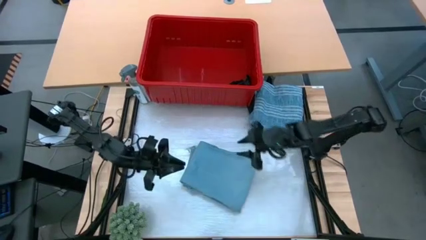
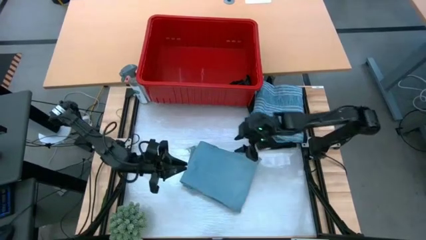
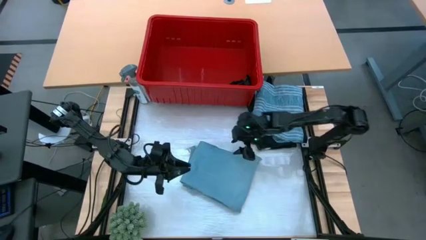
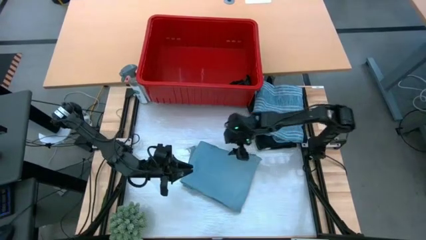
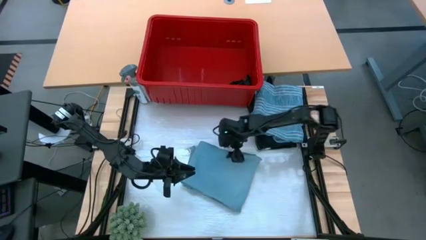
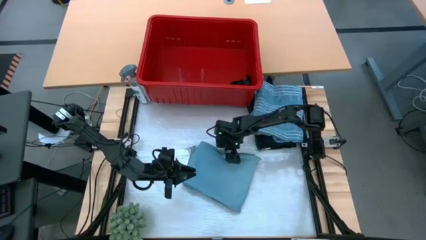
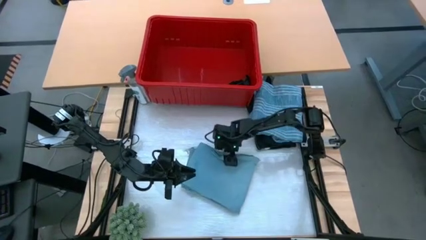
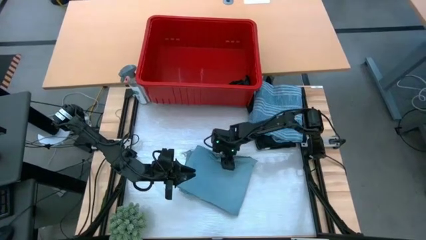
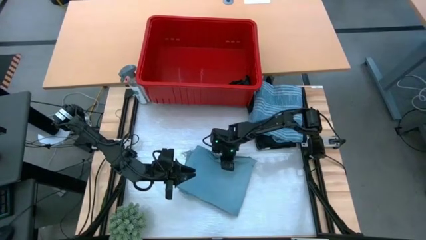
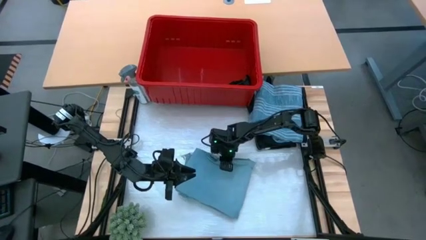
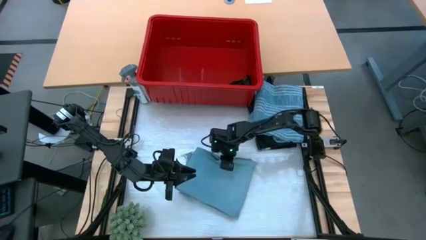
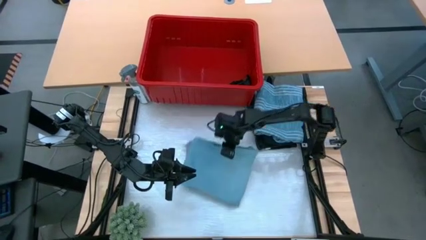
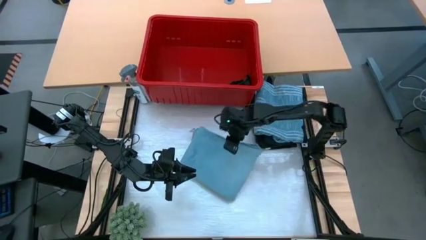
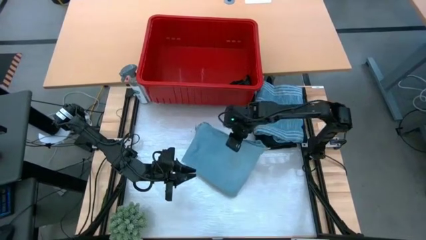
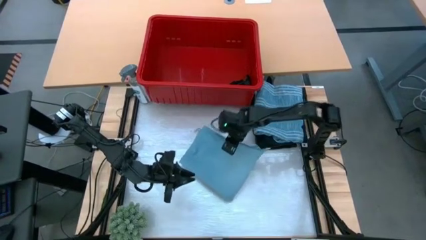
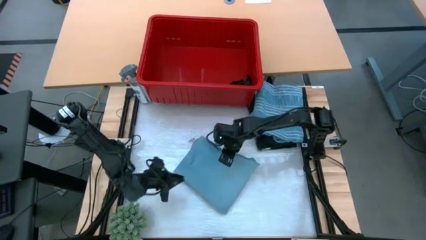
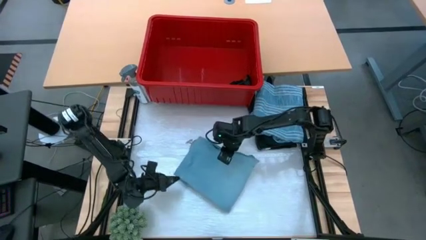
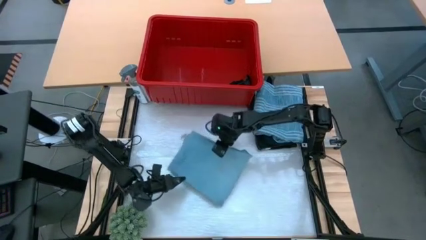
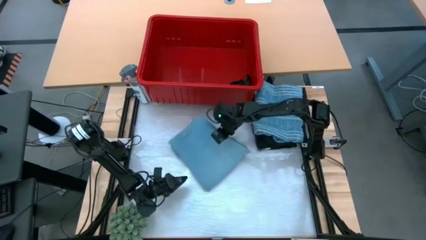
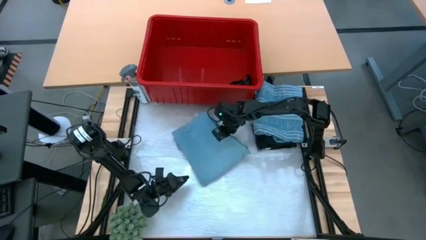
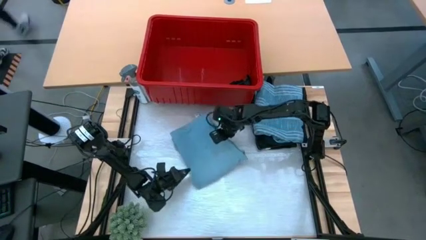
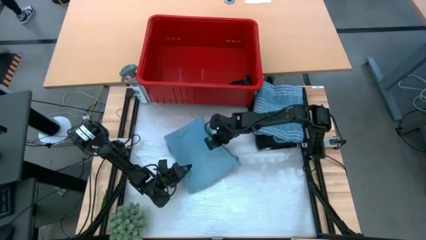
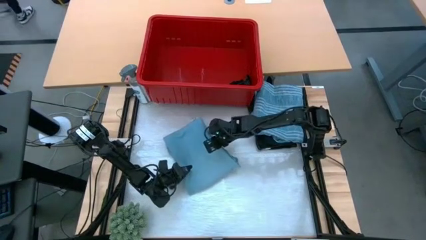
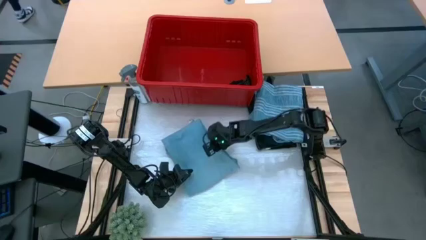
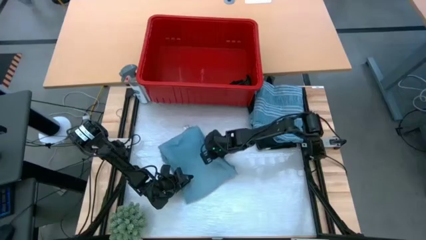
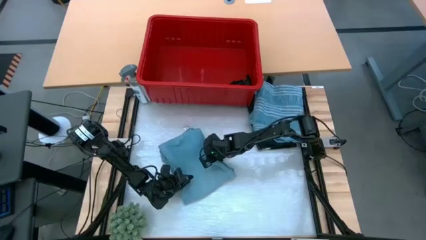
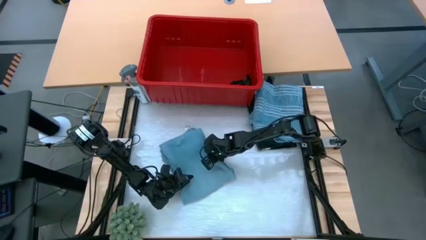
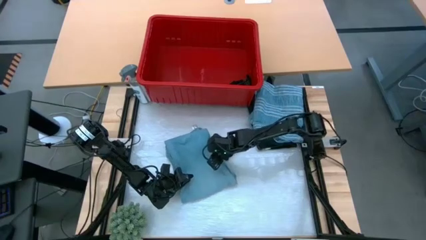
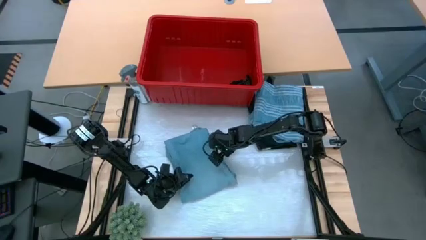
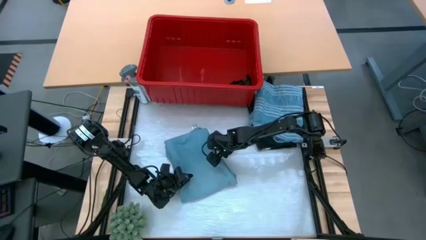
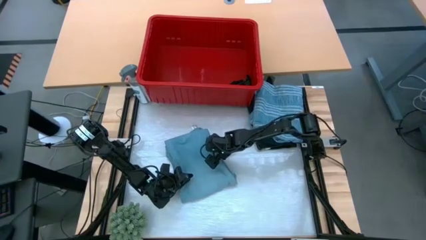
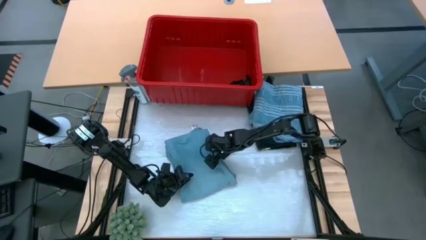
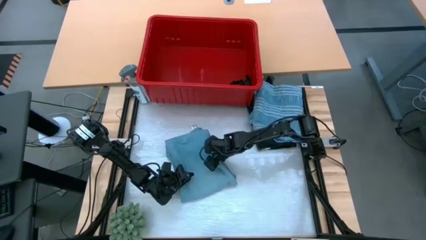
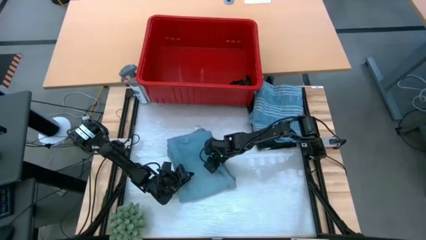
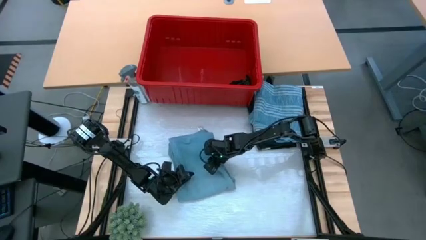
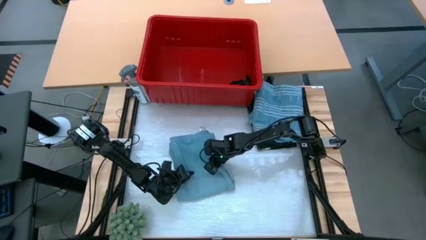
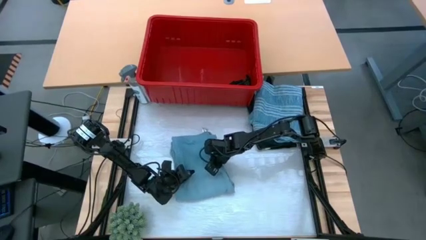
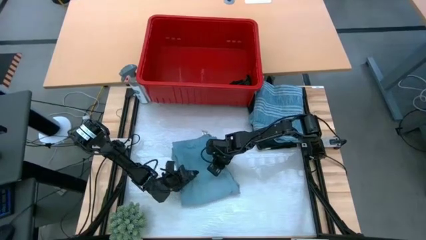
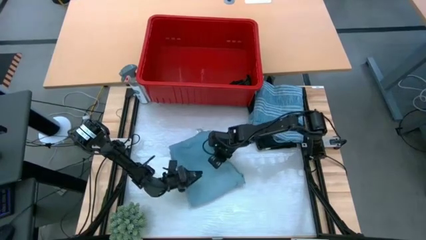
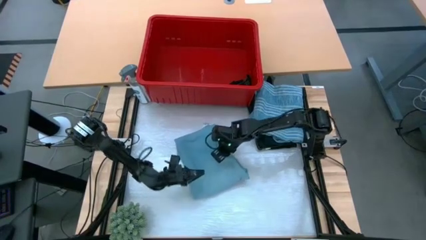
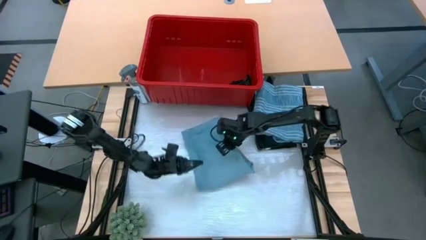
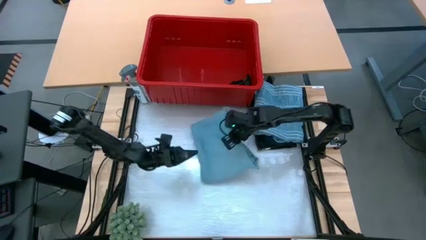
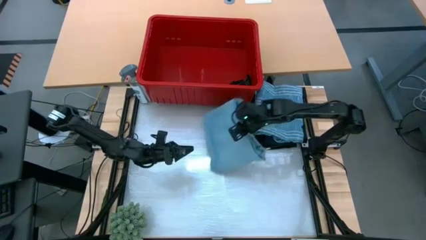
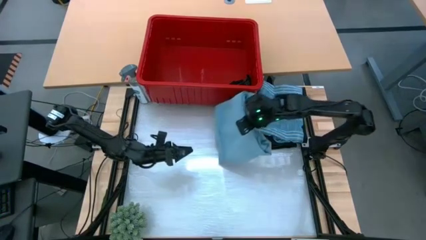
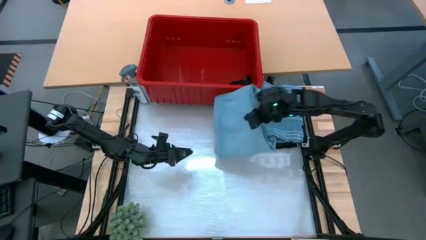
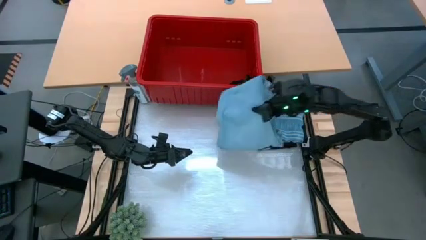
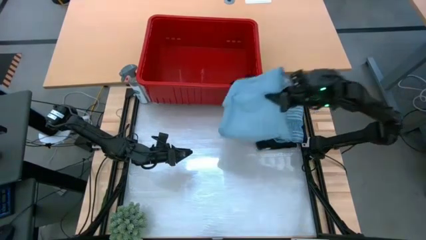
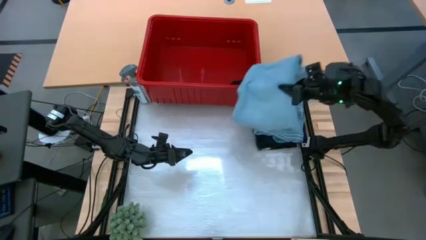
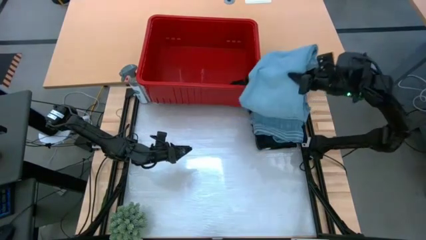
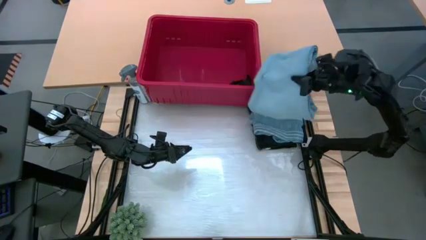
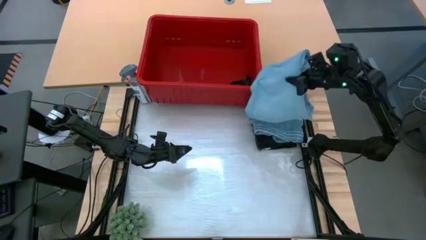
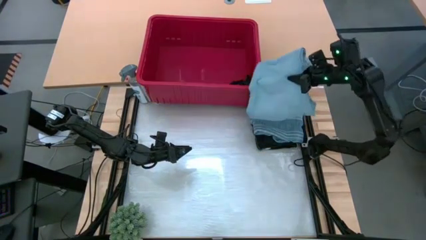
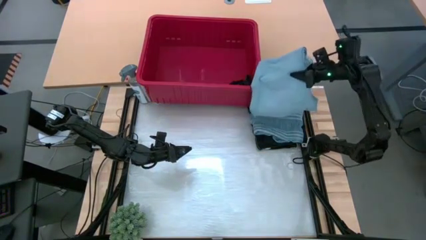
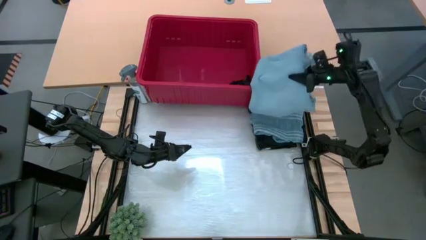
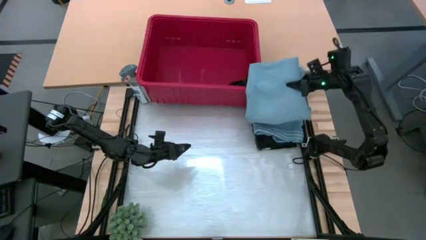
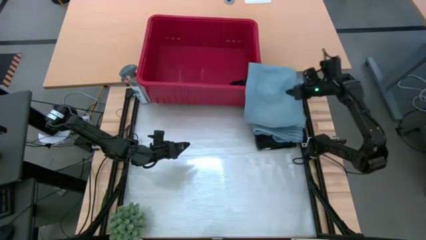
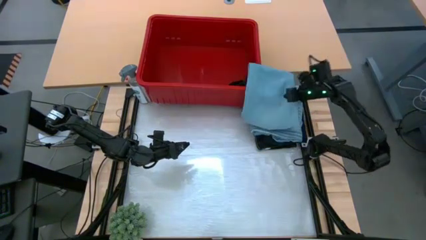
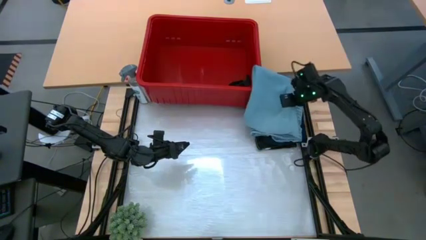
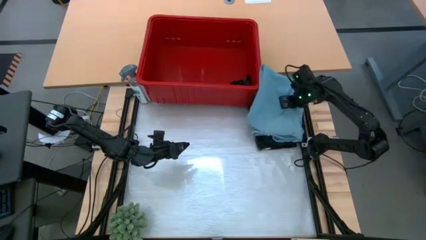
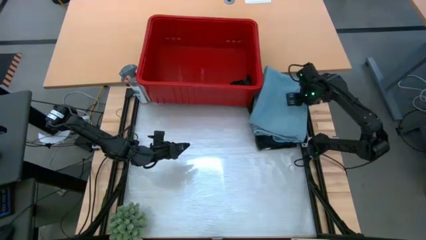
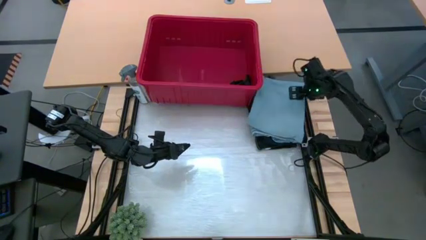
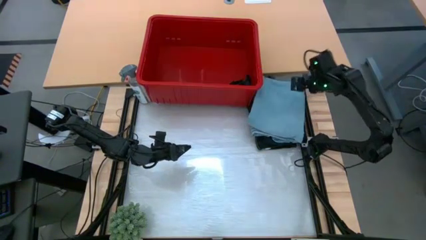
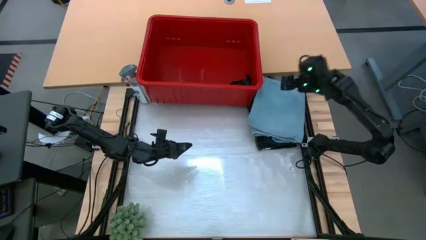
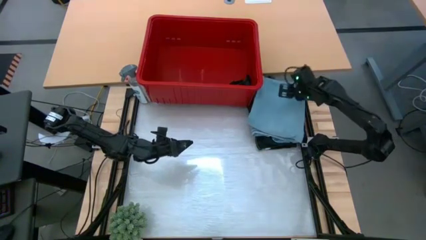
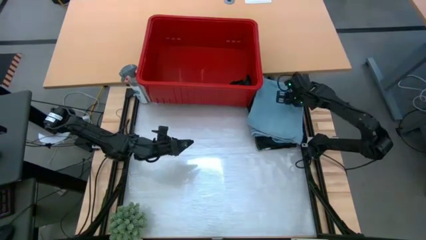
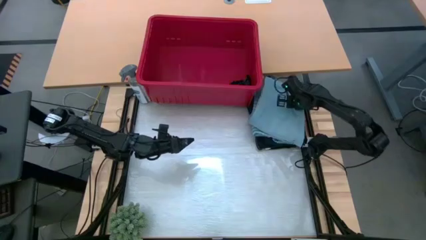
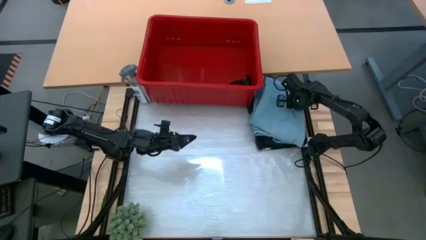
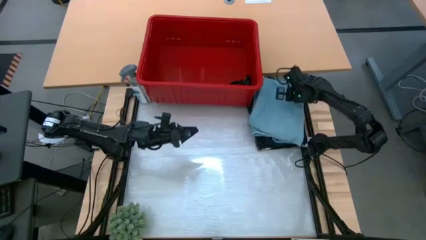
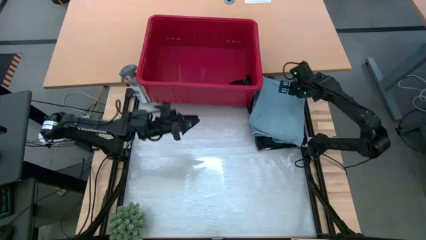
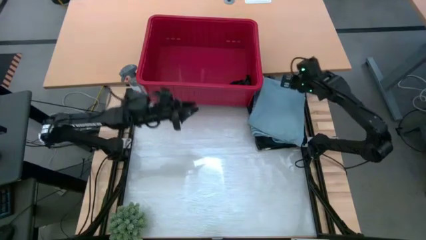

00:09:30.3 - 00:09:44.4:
Task: Fold Laundry from Bin
Stack the folded light blue pants on top of the folded light blue shirt

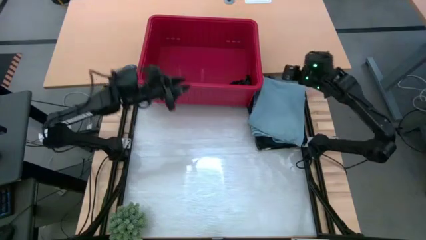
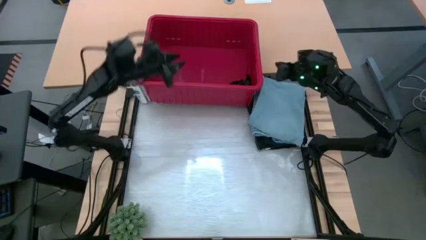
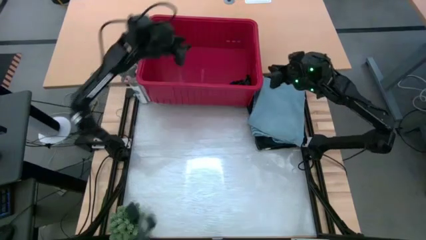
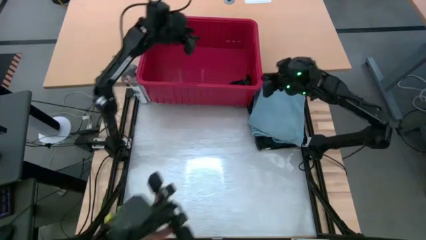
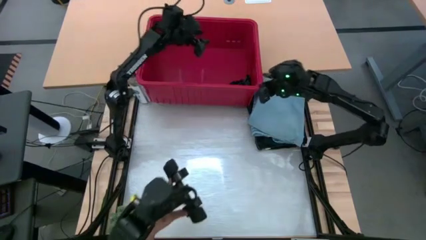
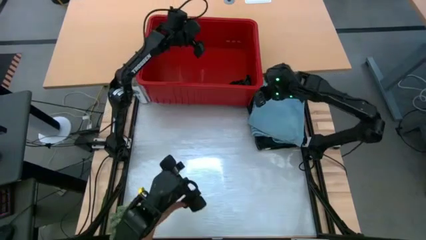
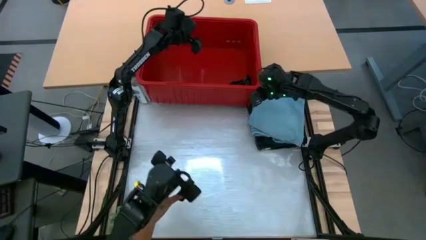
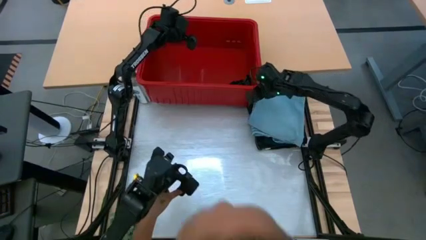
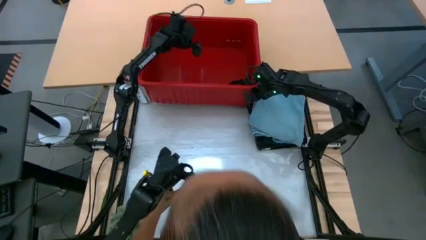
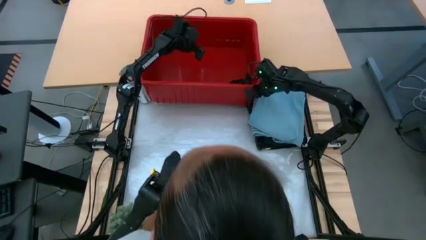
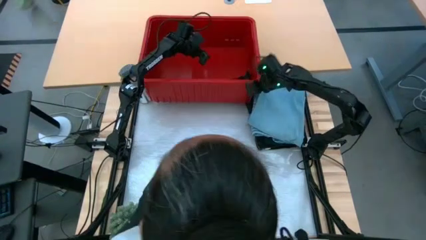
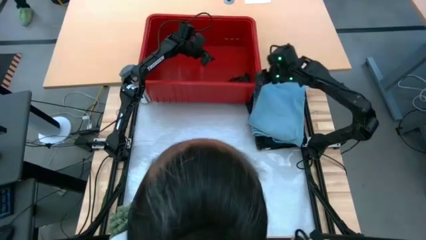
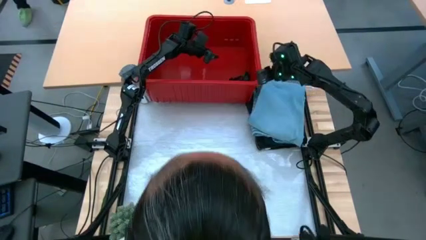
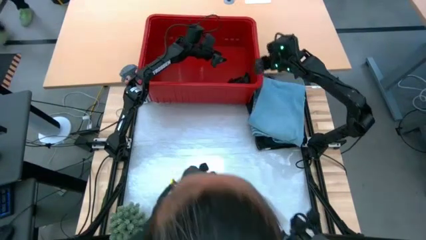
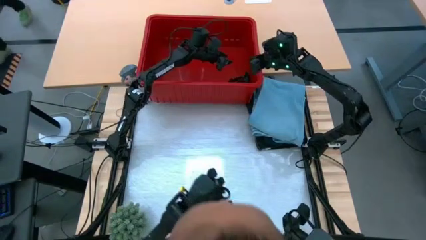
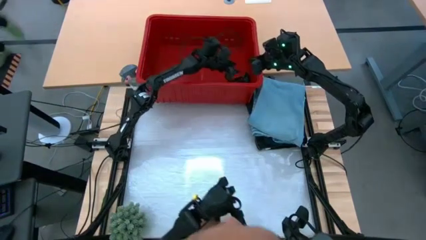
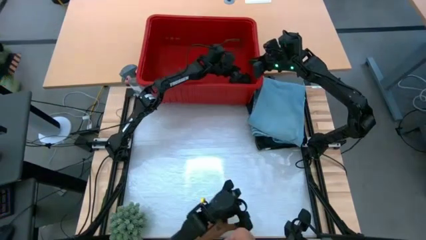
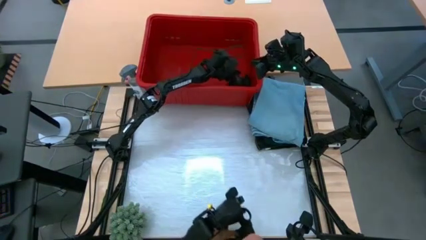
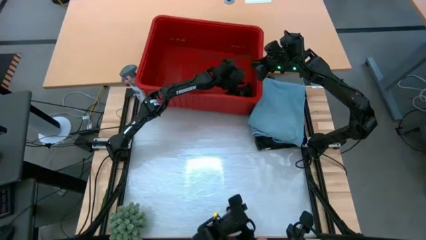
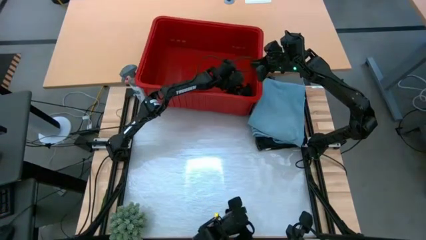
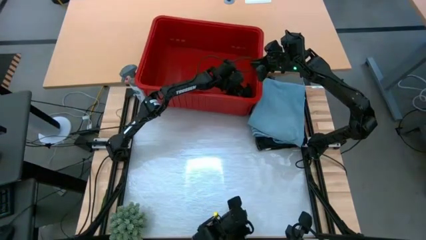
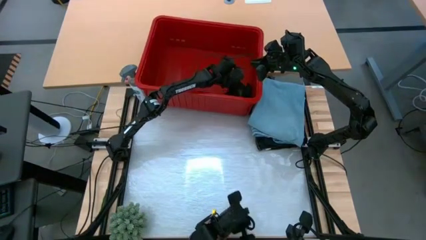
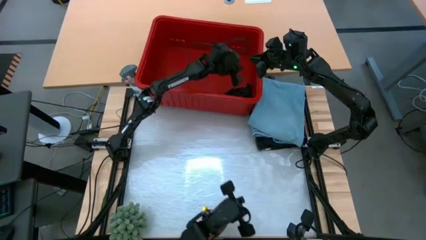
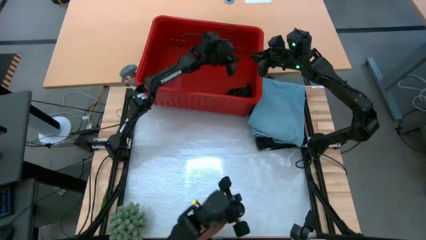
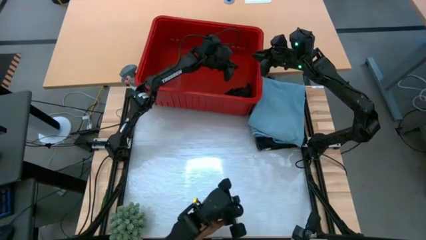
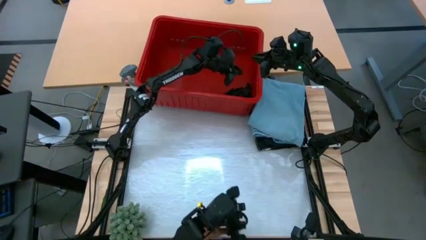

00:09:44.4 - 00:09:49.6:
Fold the black boxer short
